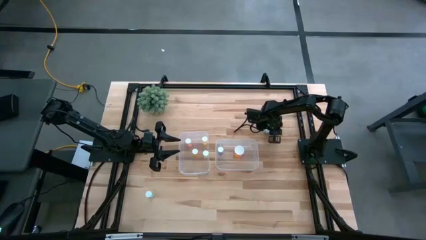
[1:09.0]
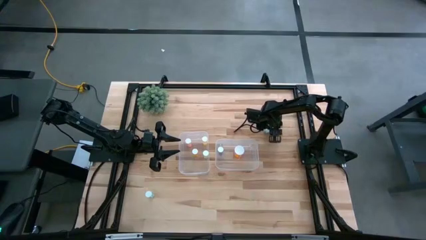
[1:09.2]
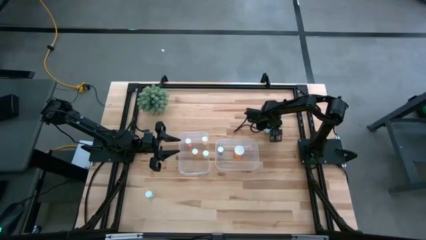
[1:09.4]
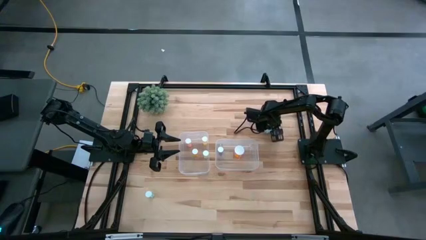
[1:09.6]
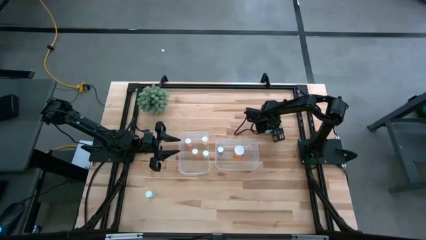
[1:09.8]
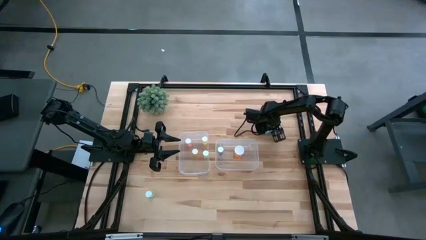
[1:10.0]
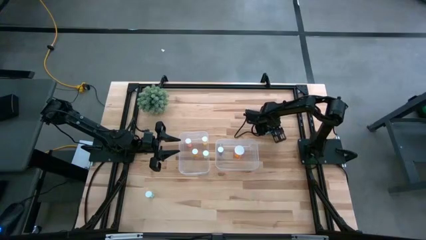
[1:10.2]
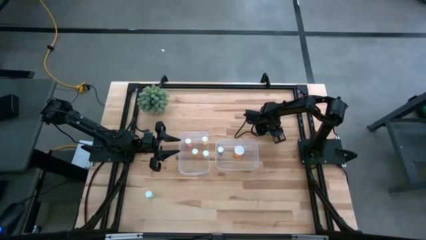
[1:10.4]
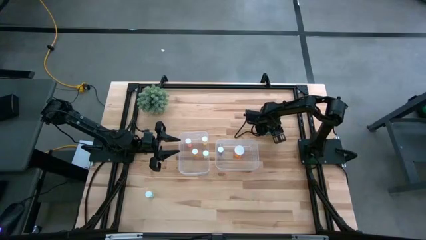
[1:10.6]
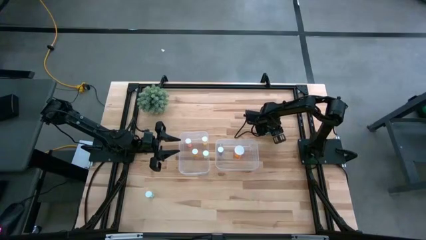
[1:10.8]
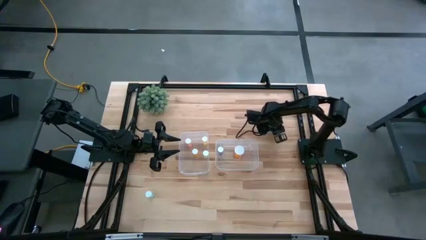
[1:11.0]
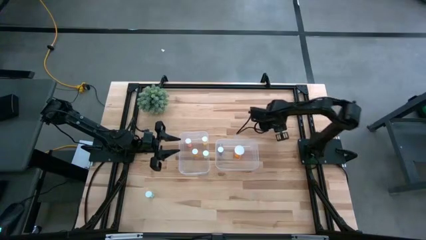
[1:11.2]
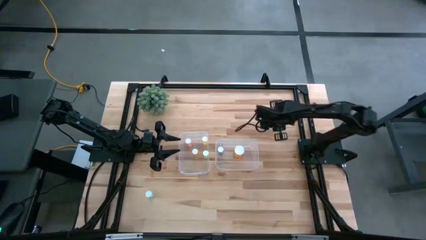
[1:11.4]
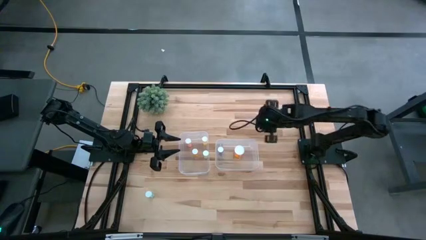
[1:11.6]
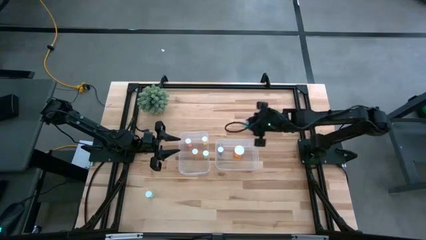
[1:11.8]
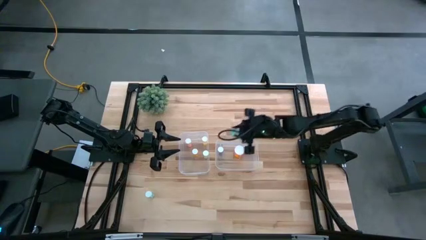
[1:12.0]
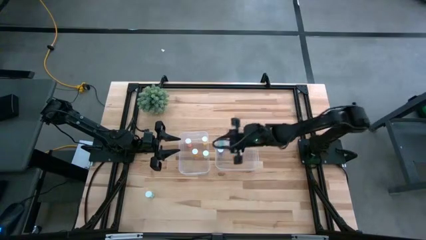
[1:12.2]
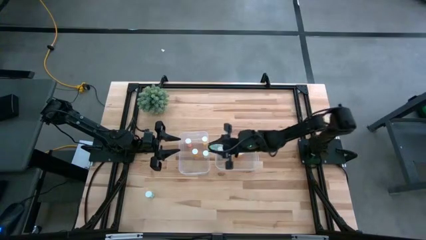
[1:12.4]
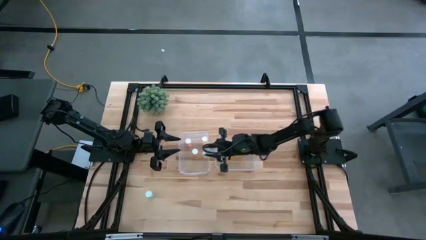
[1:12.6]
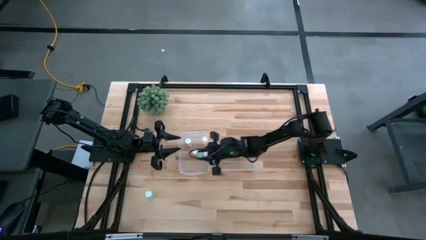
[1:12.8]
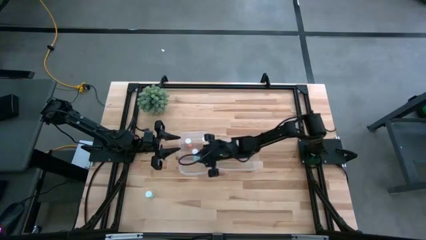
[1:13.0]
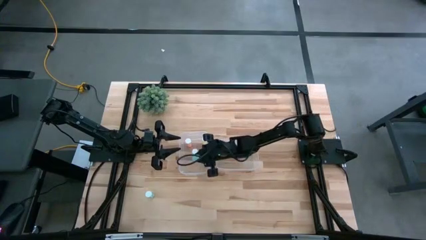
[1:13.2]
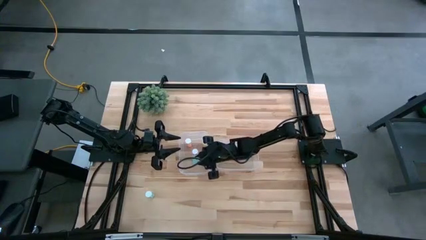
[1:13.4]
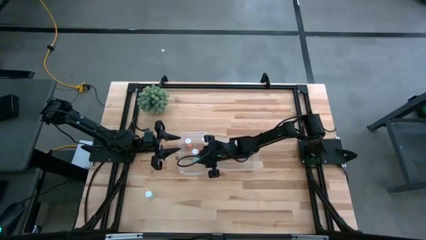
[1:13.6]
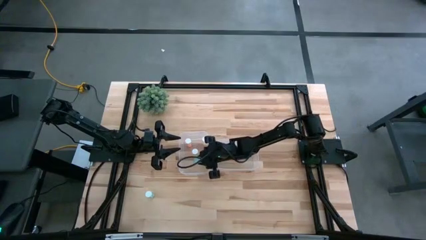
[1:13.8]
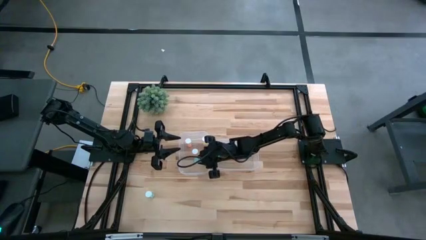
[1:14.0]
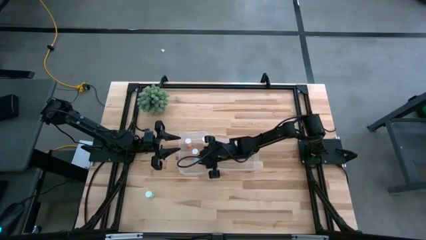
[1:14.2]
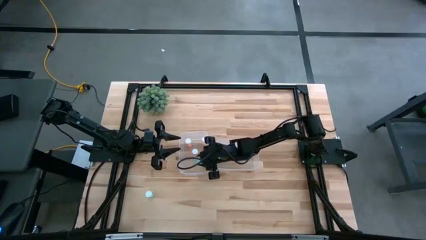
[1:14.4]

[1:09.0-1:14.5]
Task: Pick and place medicine bottles into bin by pill shape (circle, oval)
Put the top green tablet bottle into the left transparent bin

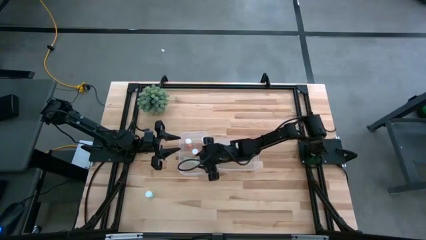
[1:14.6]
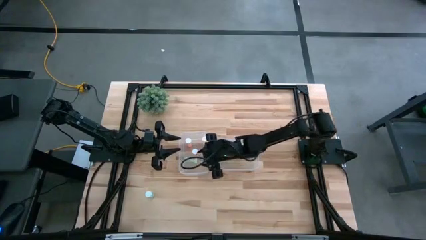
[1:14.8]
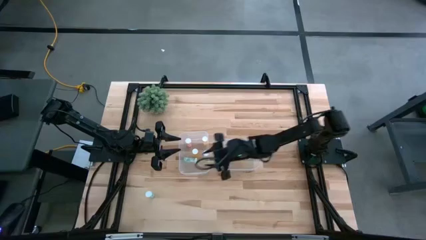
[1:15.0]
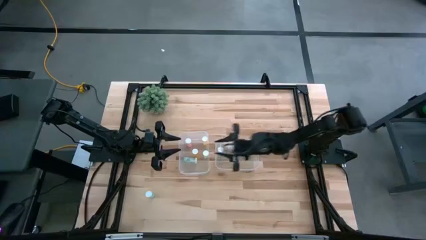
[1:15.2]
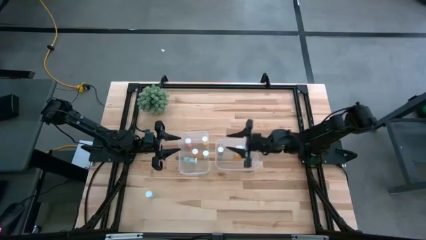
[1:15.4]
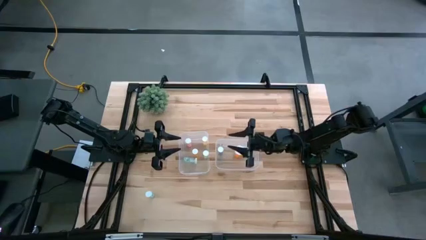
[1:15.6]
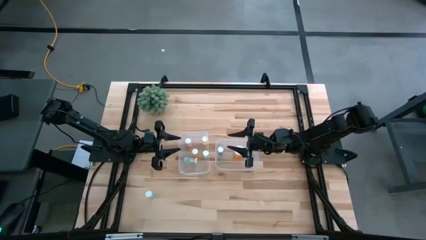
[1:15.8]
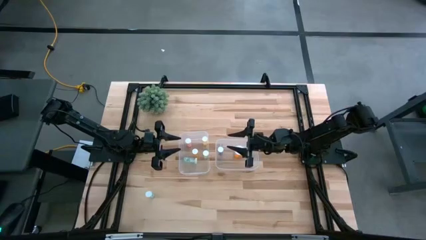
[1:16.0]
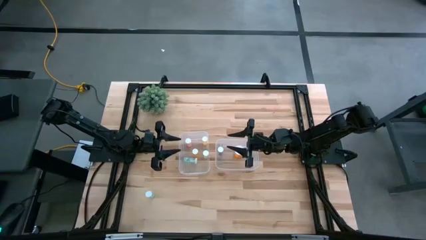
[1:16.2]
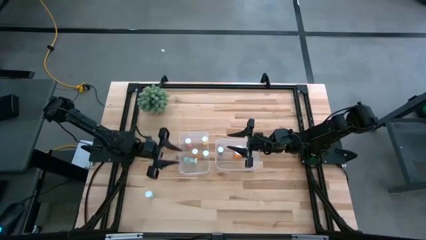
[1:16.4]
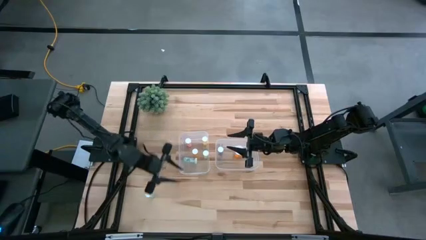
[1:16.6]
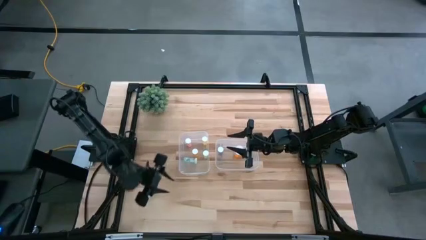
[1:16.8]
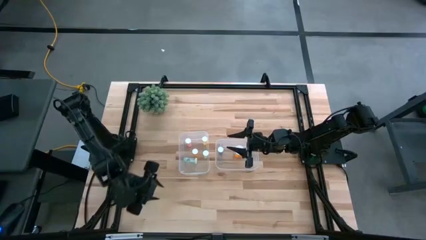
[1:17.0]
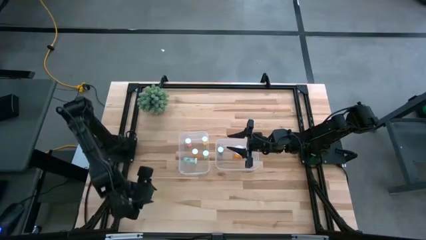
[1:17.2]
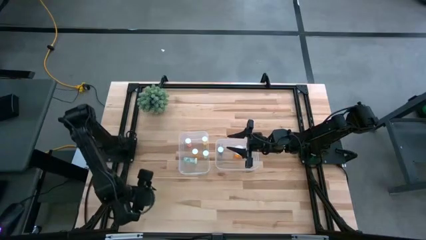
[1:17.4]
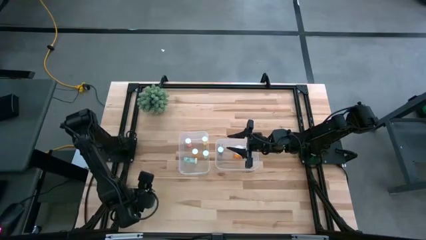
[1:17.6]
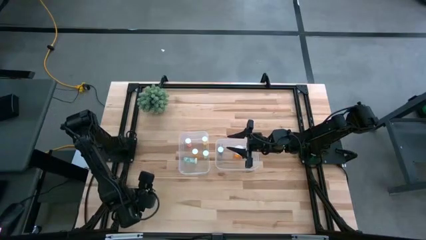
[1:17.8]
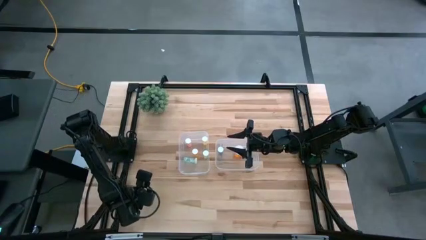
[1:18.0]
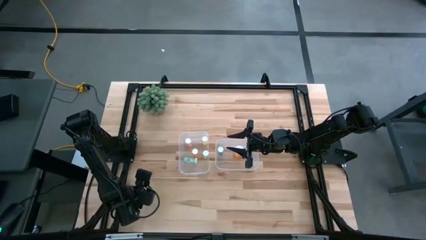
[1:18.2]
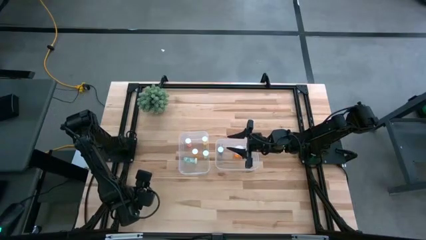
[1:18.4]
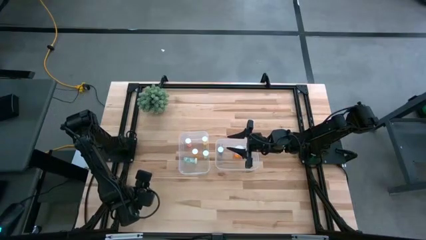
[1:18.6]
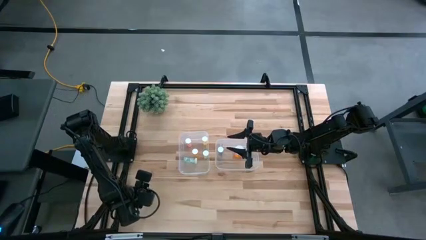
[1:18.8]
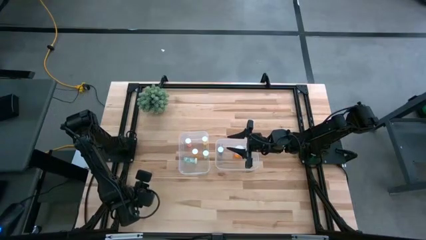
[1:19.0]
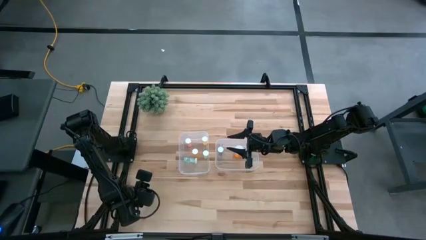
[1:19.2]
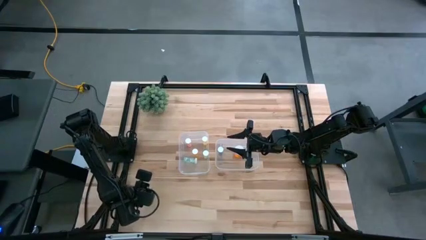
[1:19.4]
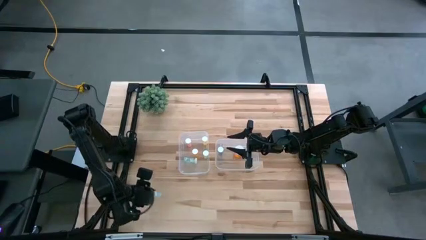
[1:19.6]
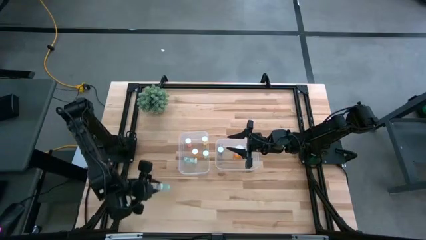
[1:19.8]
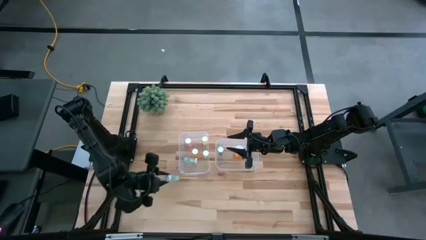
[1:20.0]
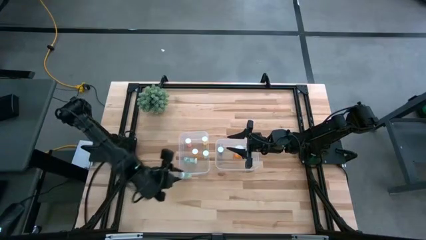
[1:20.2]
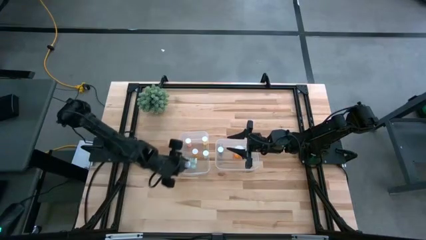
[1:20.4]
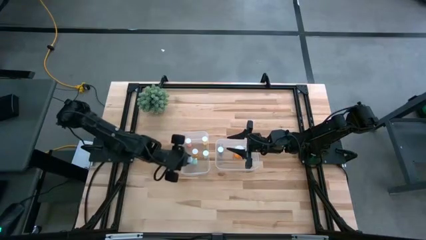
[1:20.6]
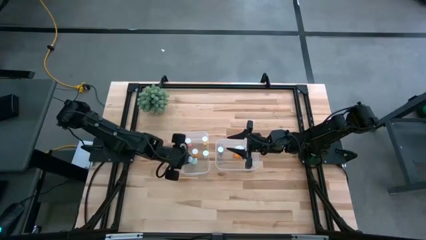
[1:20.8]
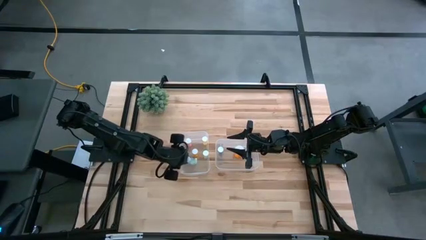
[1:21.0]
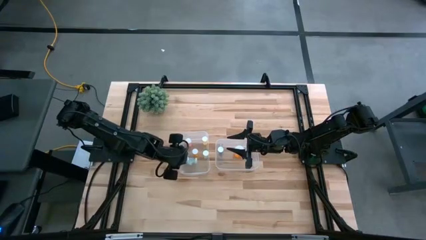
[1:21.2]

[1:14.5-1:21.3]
Put the green tablet bottle into the left transparent bin

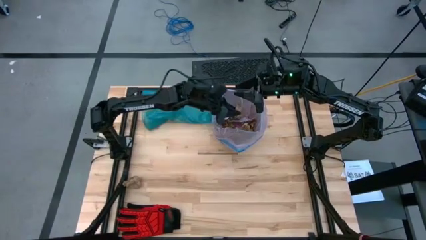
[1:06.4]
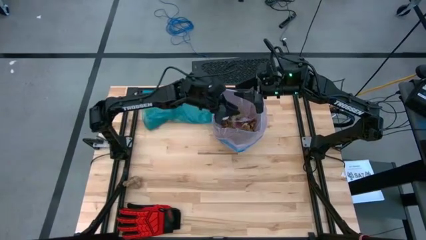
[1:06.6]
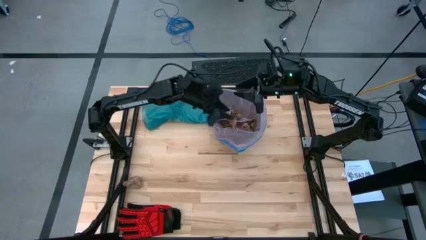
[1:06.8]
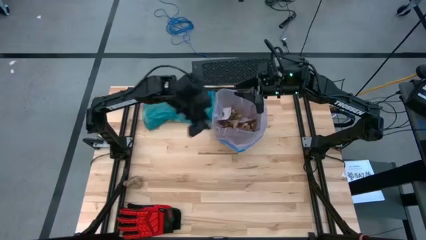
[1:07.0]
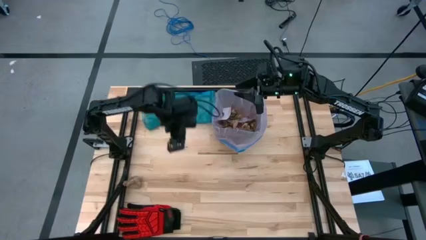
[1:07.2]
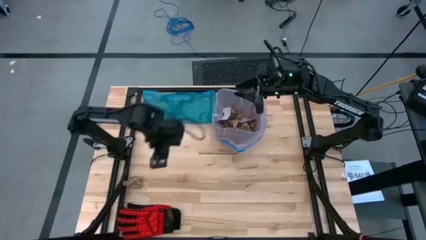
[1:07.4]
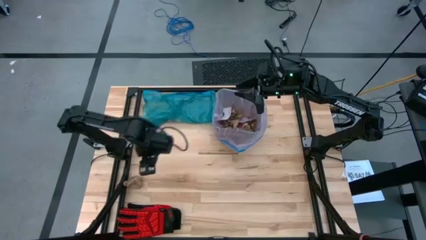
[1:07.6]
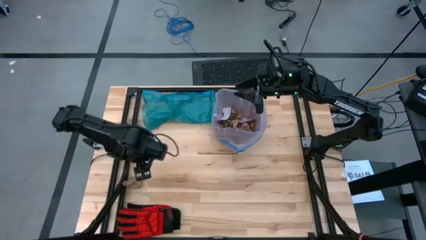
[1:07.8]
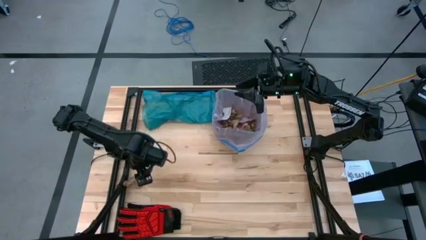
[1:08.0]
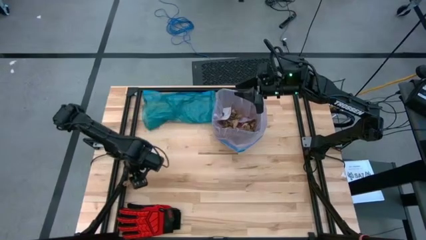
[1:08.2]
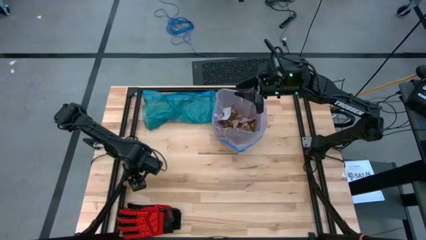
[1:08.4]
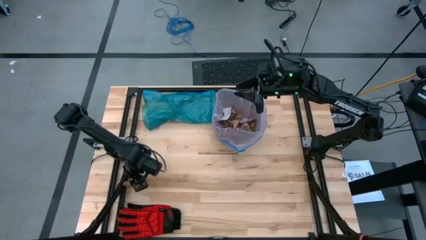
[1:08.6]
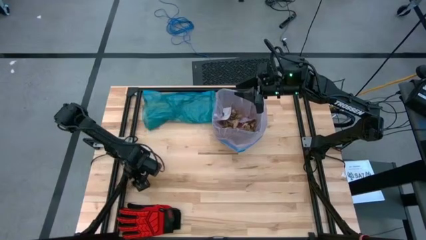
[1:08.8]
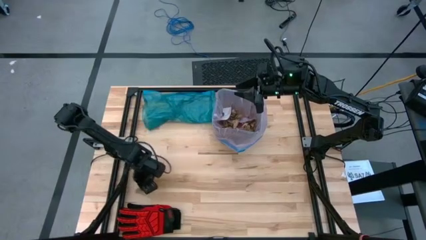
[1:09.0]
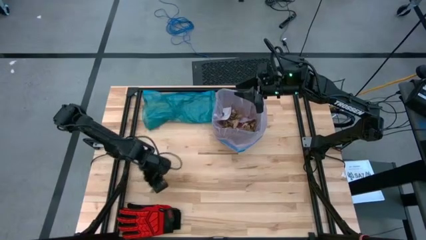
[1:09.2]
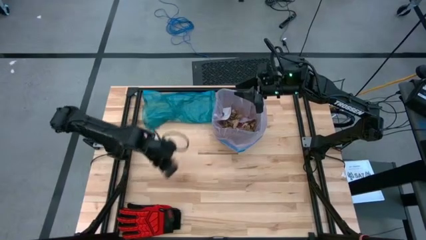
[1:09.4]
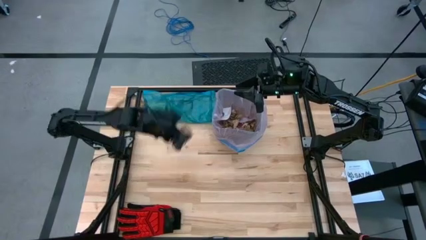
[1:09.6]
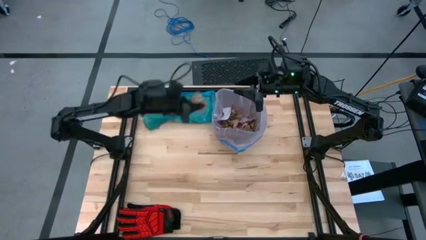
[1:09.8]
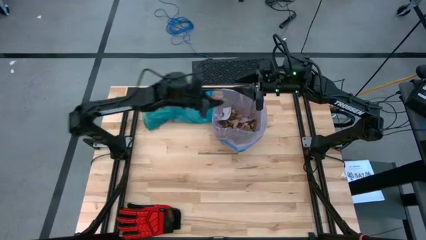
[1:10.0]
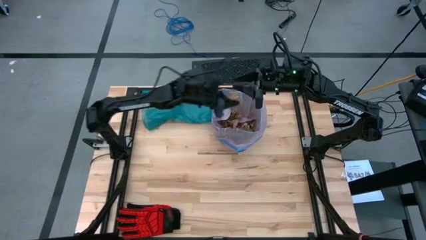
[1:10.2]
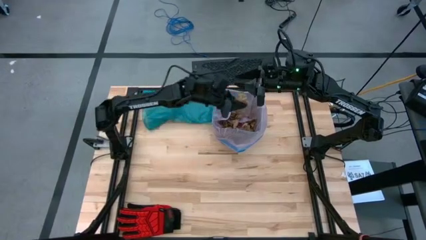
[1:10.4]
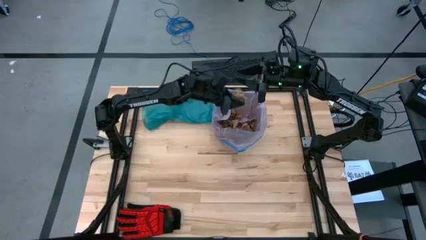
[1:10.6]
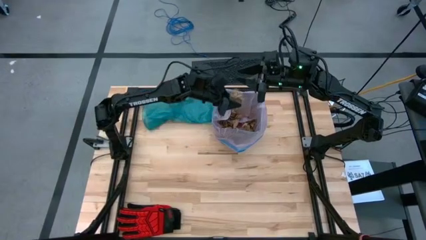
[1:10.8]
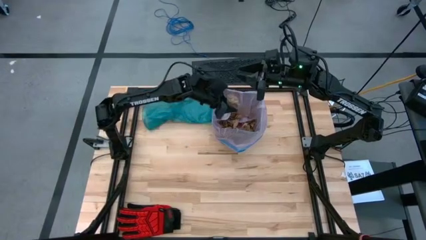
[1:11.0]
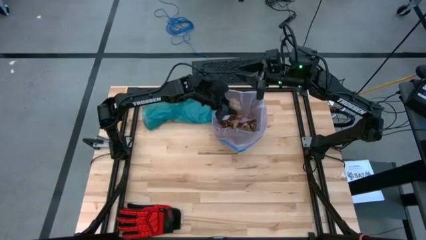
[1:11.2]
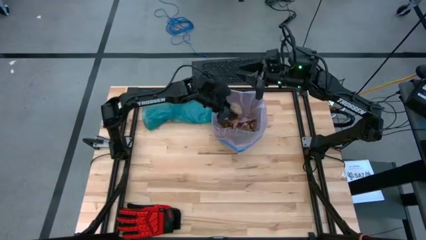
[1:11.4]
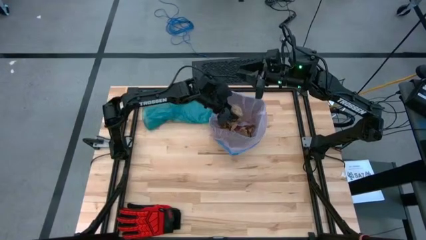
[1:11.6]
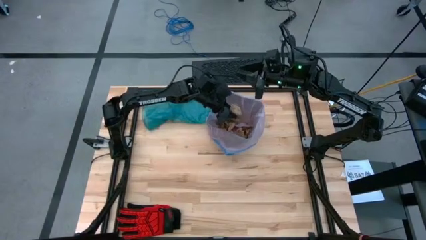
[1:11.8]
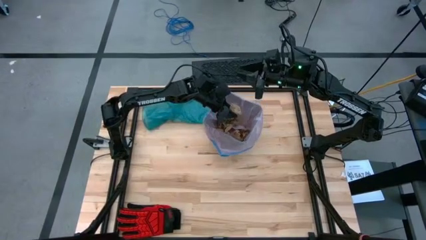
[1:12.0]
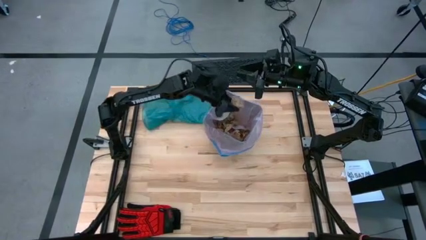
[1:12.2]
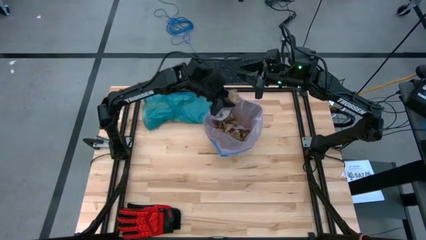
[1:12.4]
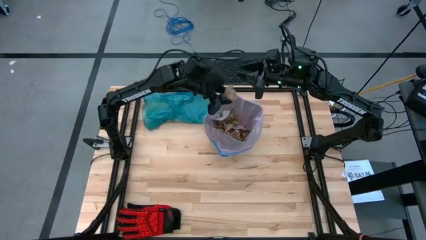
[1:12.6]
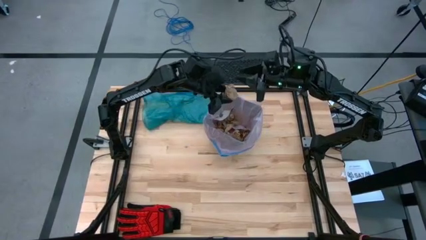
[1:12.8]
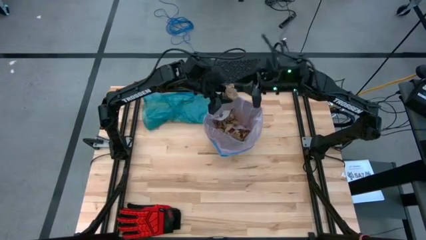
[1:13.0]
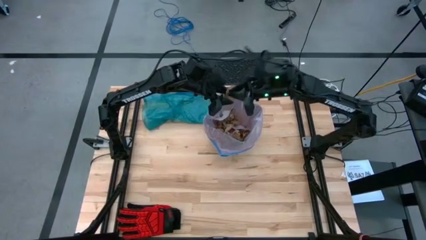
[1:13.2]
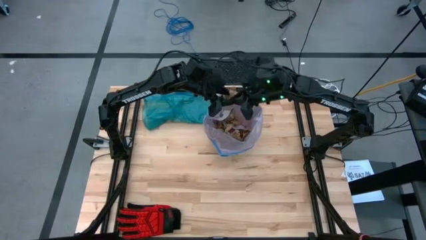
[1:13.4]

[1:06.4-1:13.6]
Task: place trash/remove bag and relplace
Put the brown paper into the black trash bin
